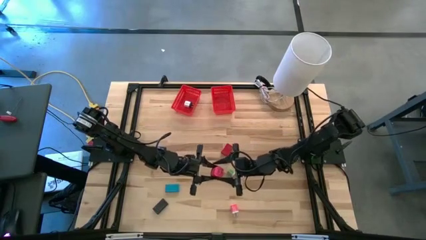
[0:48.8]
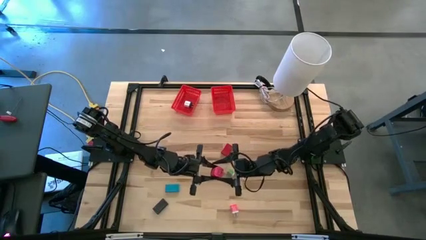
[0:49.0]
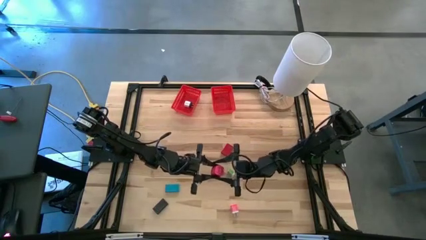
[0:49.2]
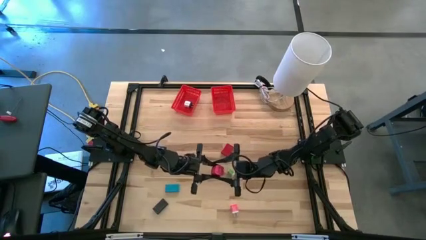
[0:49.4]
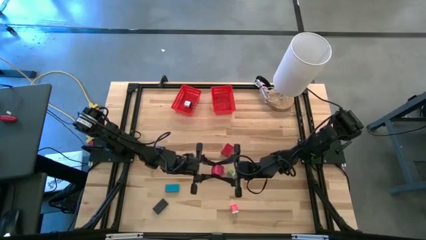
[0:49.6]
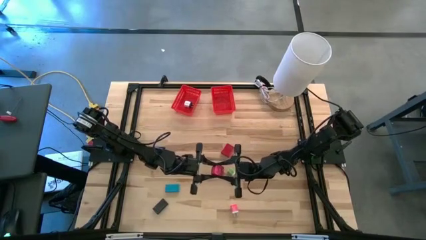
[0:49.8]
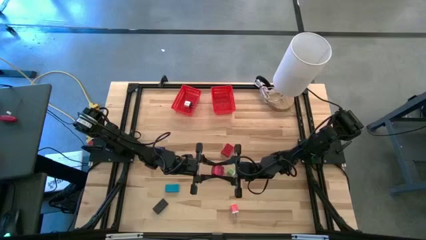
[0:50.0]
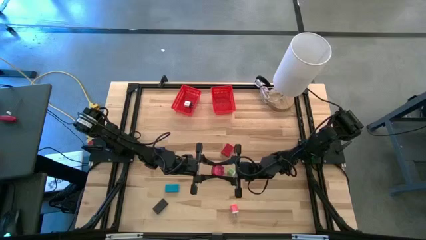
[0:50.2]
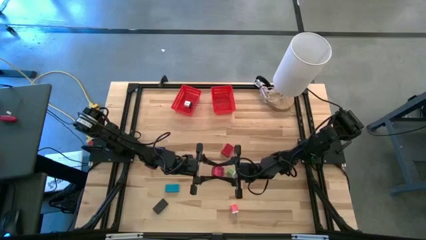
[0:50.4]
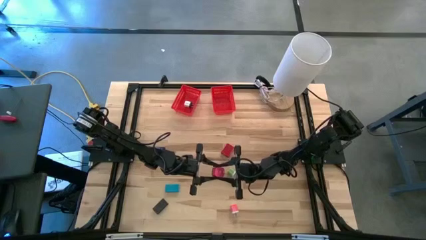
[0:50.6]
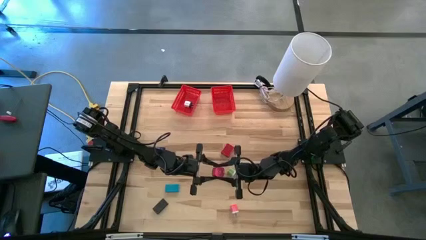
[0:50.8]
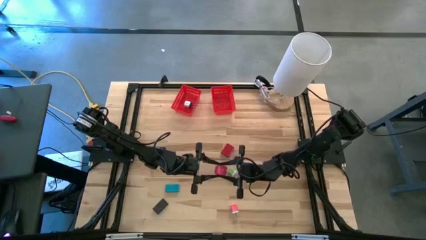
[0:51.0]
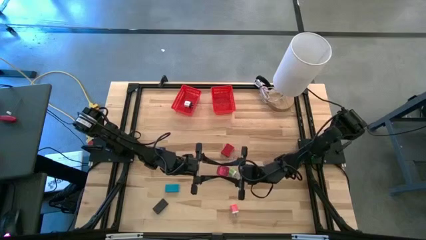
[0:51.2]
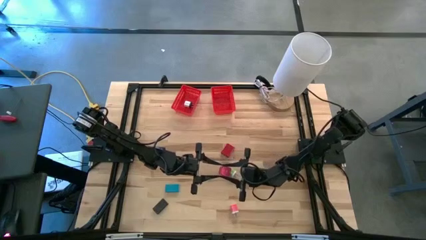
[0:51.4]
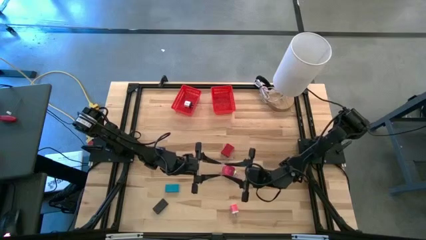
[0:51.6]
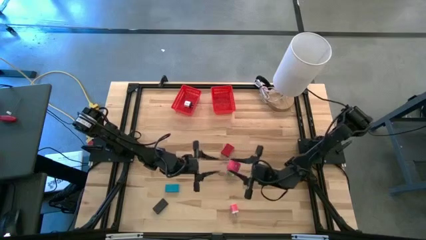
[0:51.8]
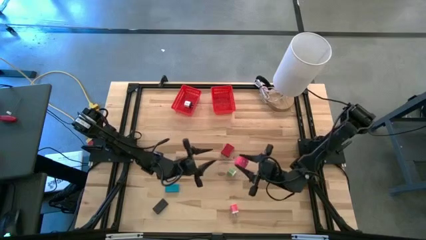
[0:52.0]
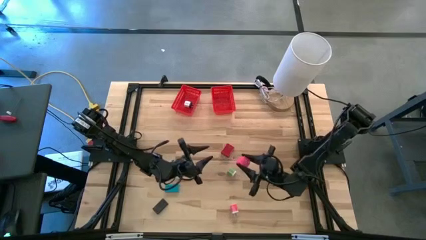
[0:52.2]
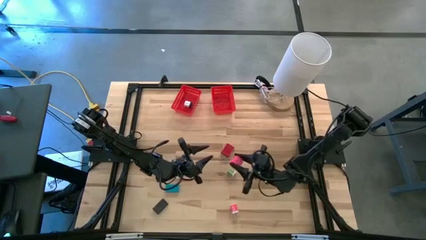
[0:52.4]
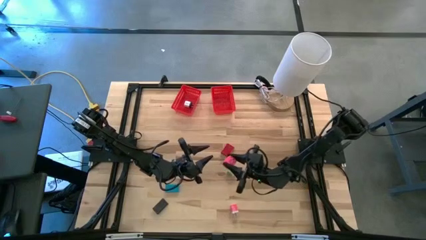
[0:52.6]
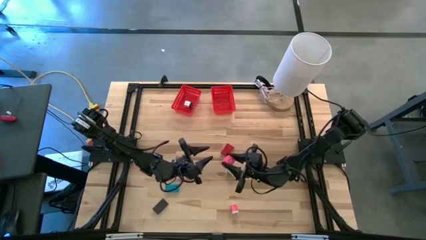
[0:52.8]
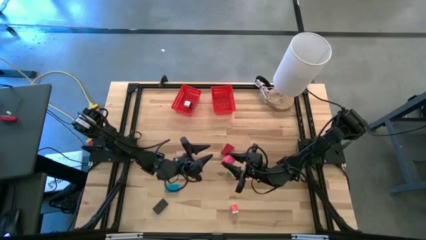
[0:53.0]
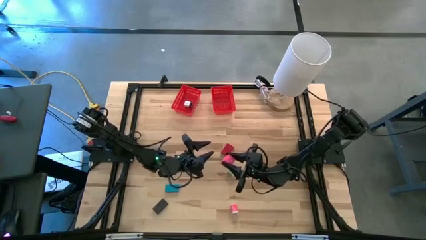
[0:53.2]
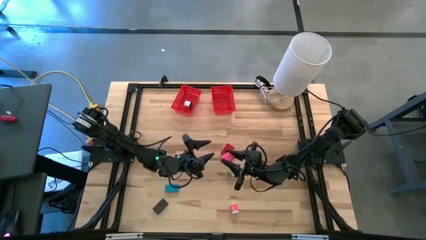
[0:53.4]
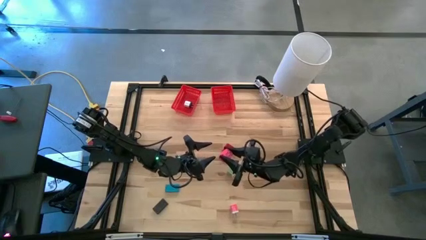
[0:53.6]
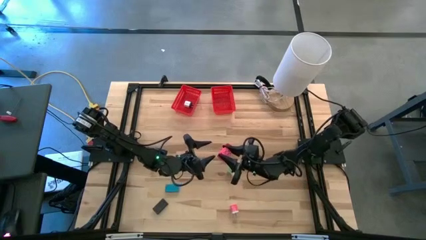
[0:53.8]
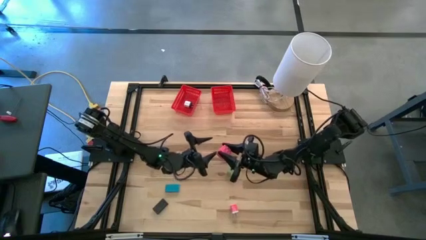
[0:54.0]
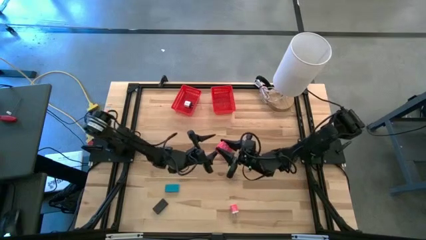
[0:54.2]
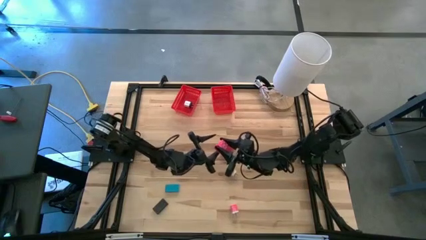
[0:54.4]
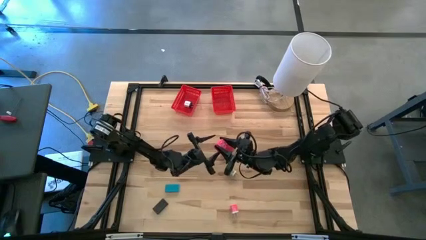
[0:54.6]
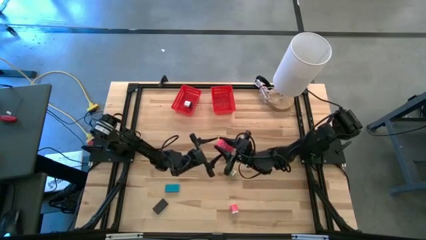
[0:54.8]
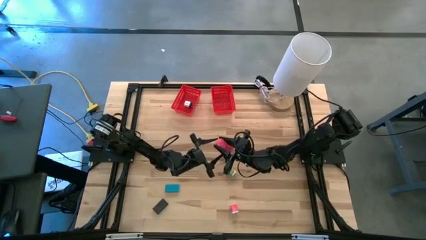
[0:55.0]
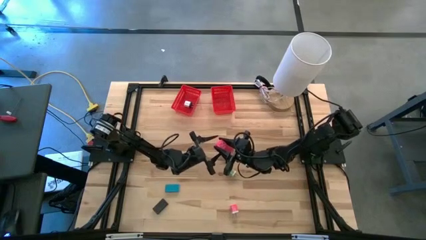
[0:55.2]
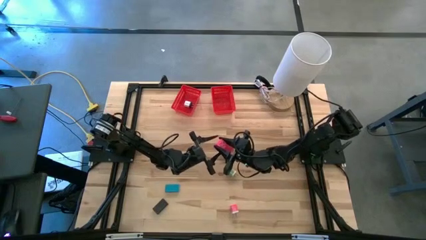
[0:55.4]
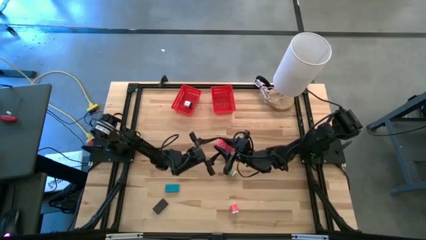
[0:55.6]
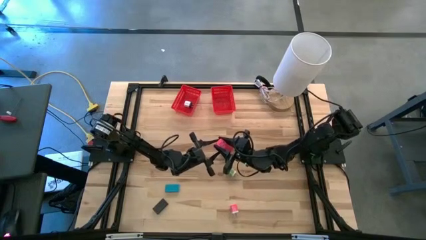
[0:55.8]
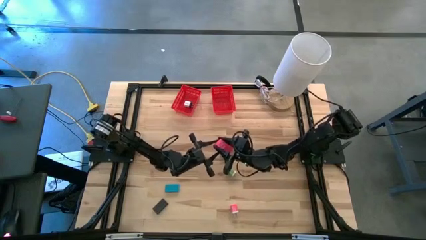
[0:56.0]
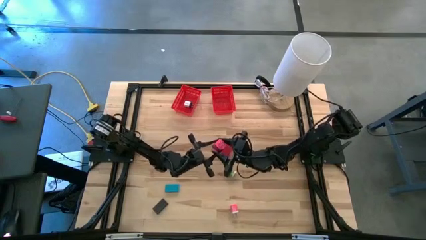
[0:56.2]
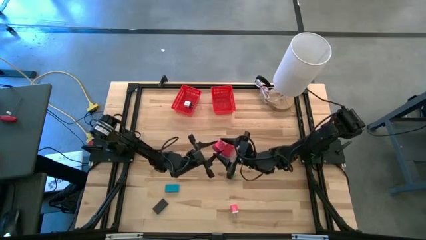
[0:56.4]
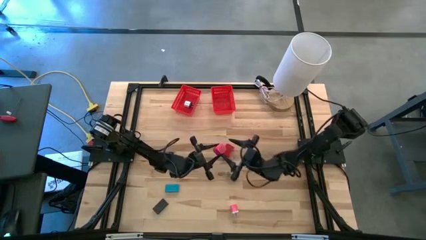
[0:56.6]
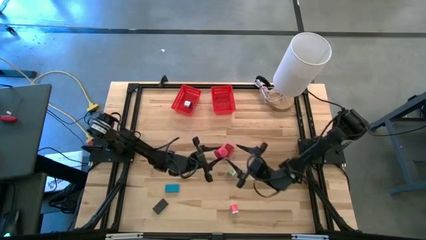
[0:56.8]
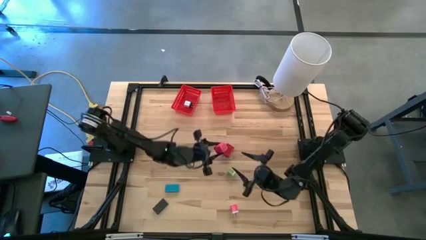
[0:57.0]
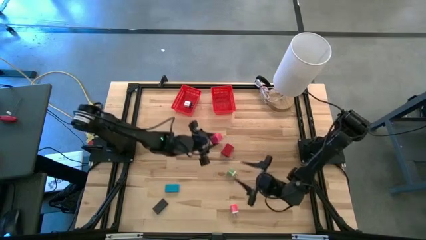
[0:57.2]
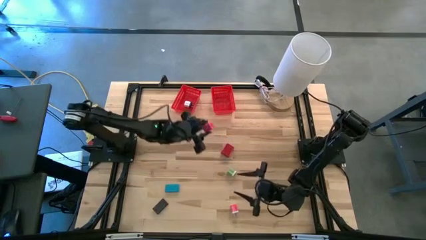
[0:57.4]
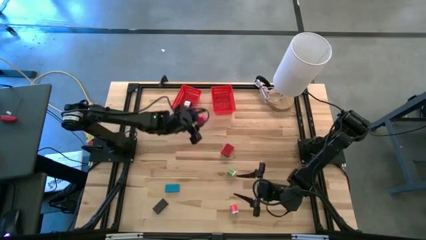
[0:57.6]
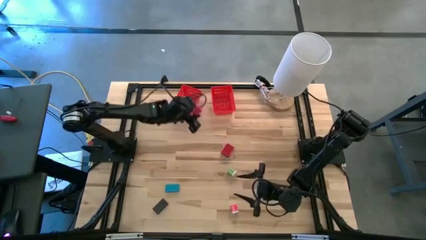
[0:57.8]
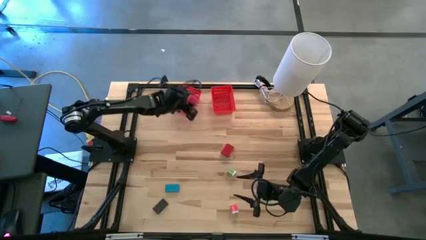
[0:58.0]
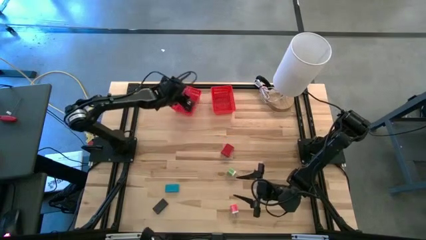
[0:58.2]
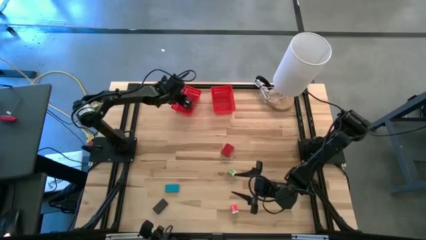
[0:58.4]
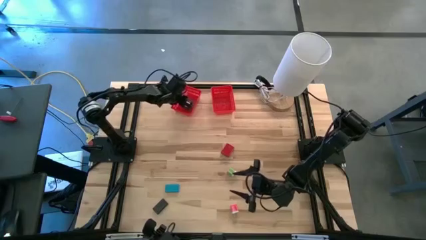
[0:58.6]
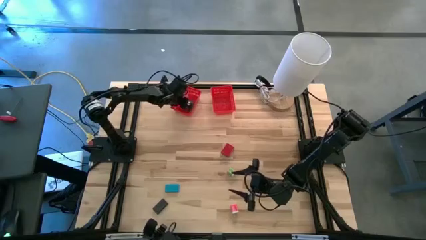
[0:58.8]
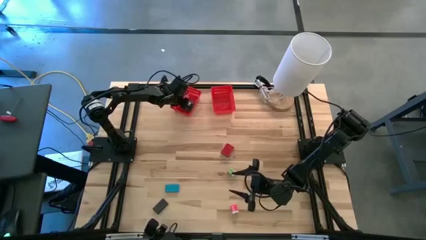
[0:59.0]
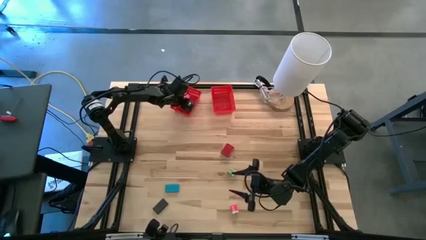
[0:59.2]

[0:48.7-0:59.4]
Task: Pick & Place Office items
Put the pink charger adapter into the left red bin
